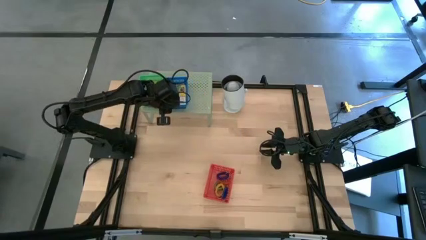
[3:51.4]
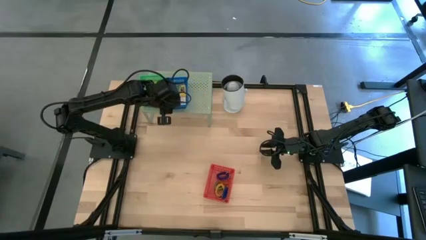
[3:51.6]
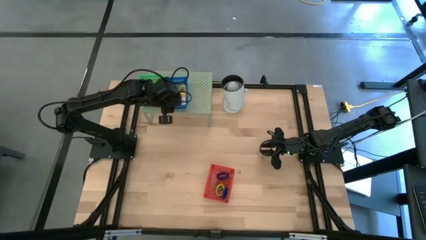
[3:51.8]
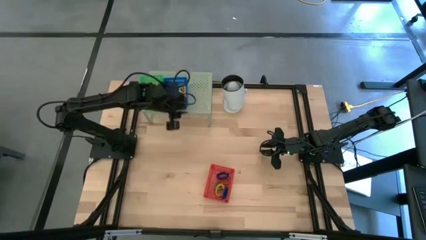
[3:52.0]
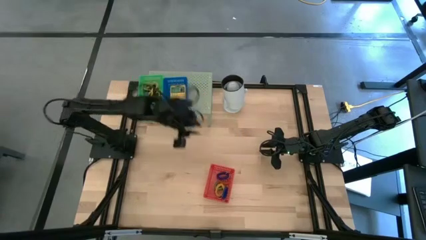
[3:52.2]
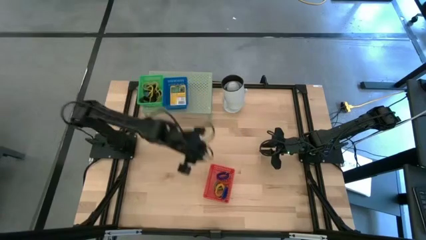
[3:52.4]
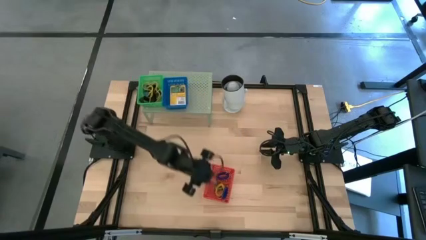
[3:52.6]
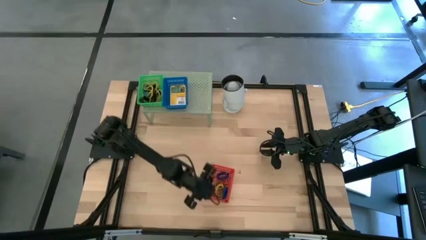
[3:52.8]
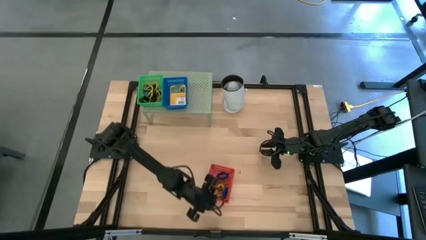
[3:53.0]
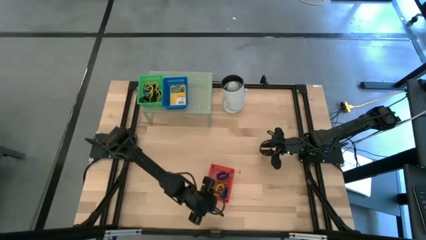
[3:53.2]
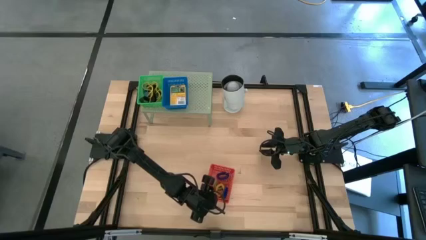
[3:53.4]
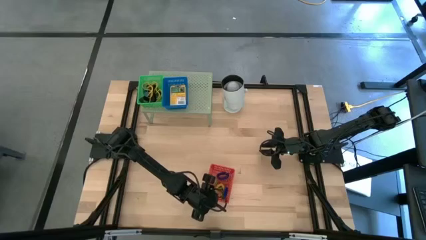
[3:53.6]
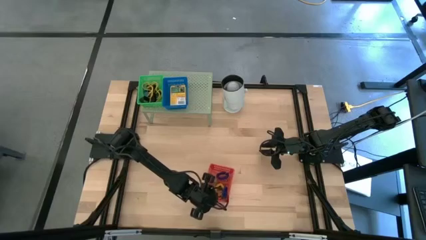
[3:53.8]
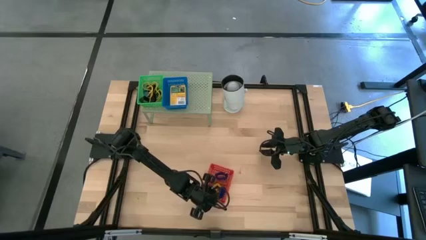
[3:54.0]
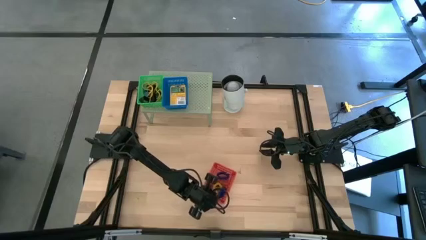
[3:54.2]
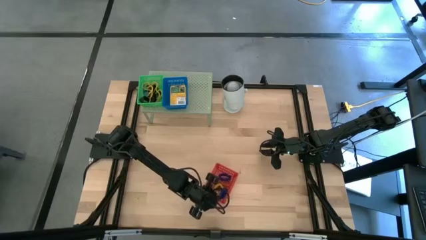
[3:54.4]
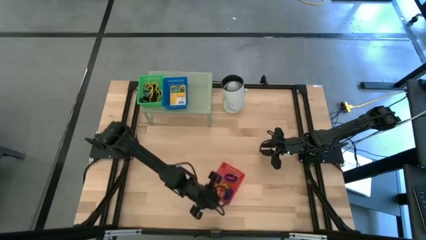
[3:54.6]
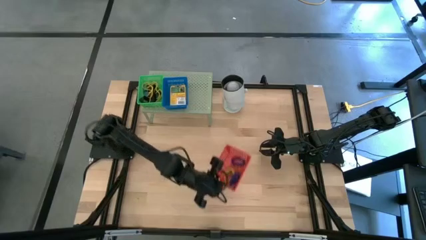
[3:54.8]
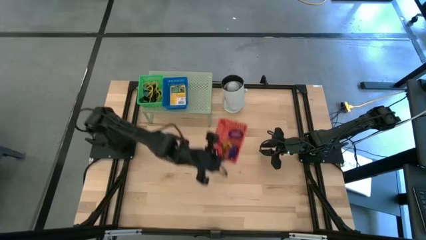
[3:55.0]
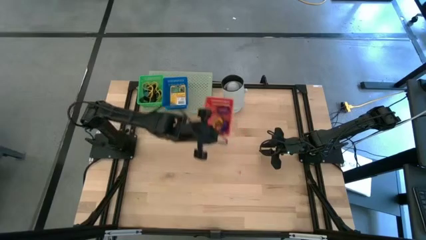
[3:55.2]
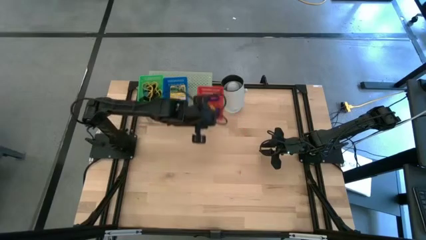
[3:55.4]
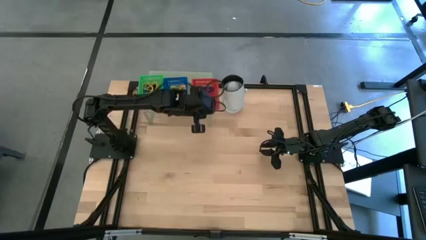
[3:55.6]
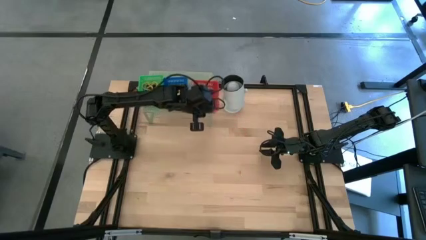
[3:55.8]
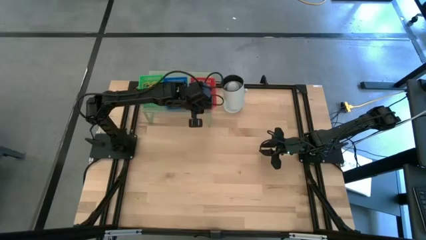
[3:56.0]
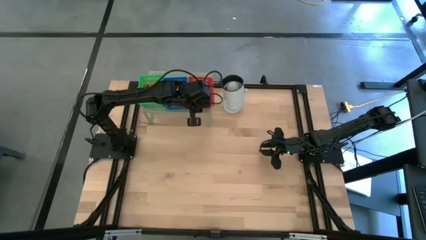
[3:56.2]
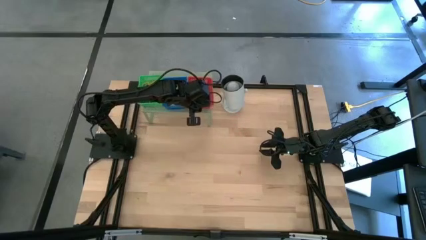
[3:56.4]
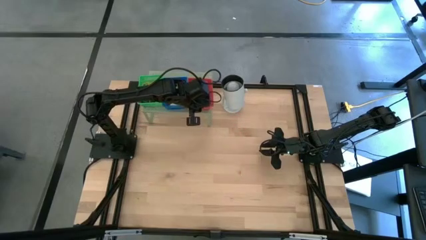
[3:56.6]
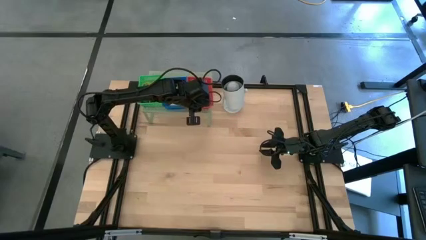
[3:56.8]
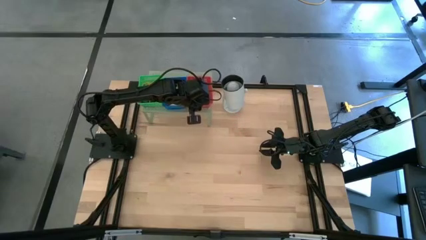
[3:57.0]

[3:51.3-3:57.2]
Task: Pick & Place Office Desk Supplies
Put the red bin on the shelf

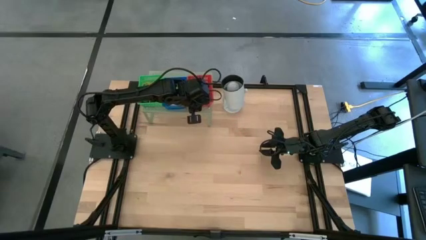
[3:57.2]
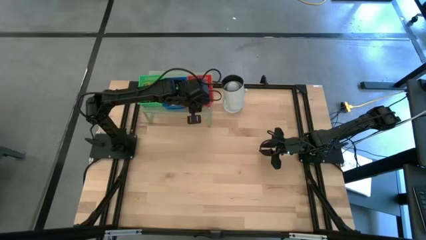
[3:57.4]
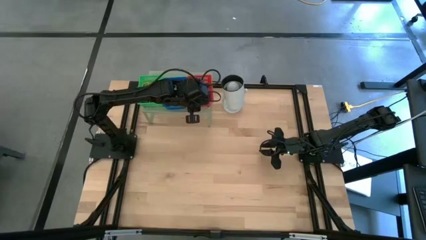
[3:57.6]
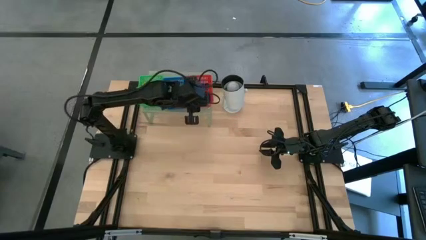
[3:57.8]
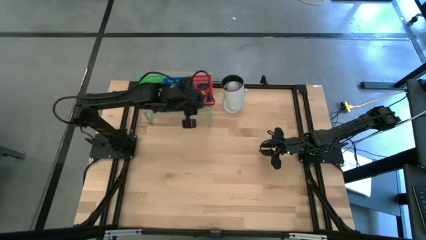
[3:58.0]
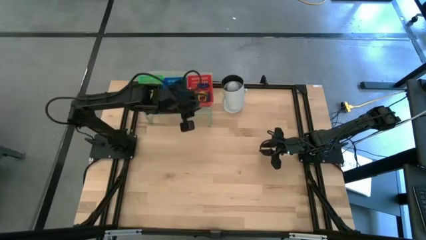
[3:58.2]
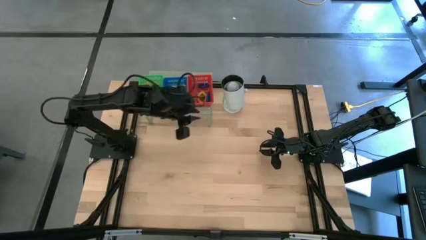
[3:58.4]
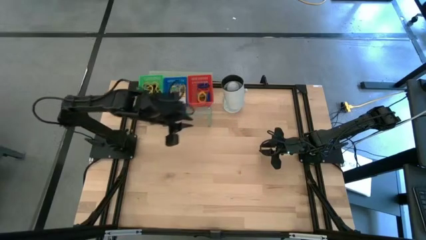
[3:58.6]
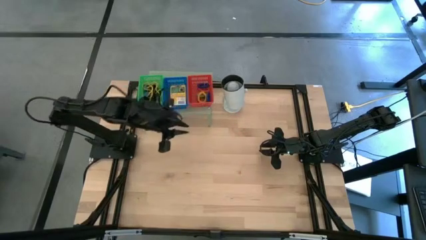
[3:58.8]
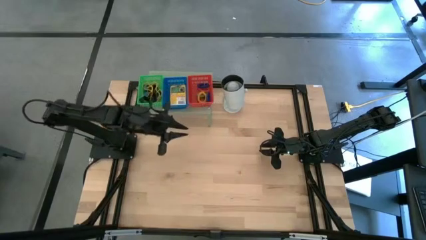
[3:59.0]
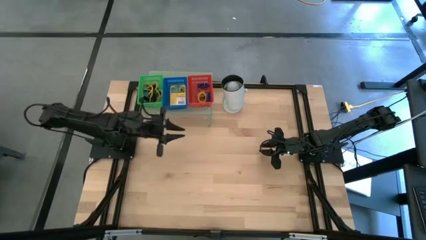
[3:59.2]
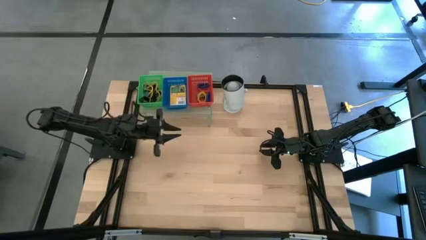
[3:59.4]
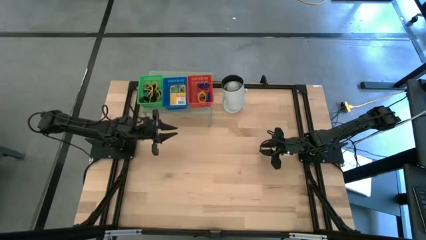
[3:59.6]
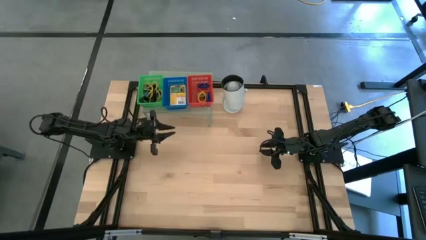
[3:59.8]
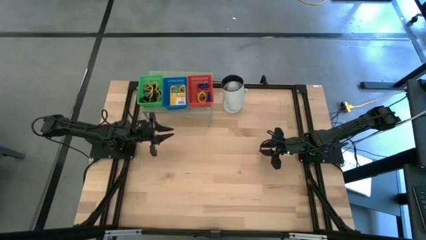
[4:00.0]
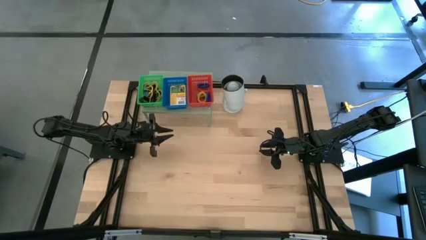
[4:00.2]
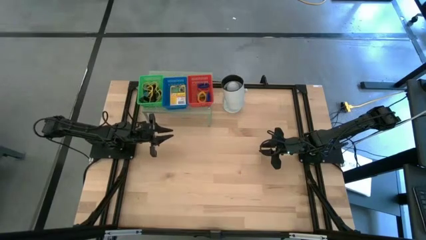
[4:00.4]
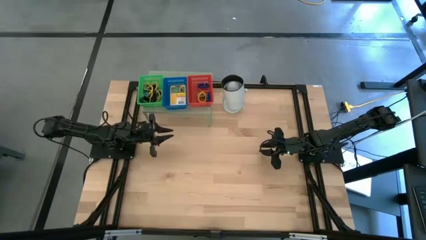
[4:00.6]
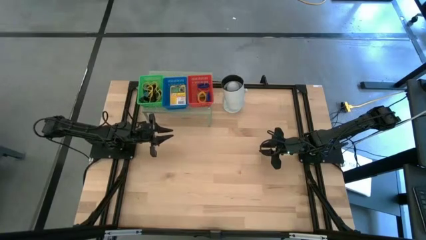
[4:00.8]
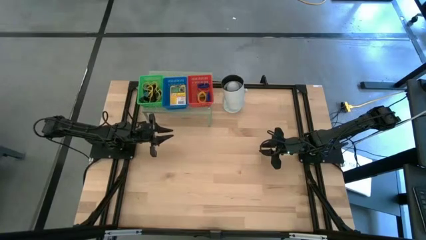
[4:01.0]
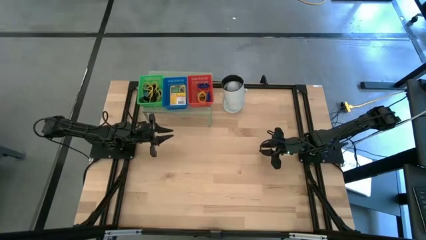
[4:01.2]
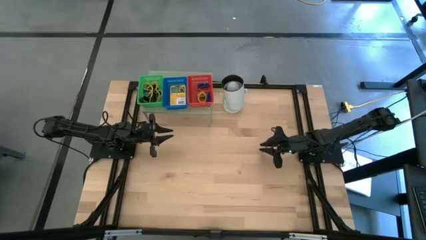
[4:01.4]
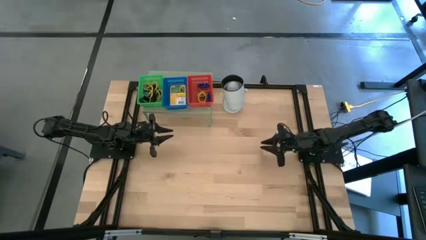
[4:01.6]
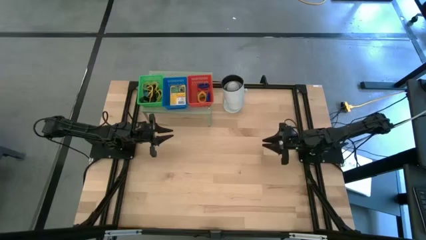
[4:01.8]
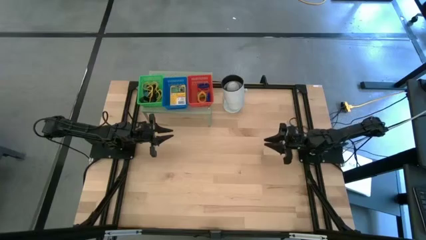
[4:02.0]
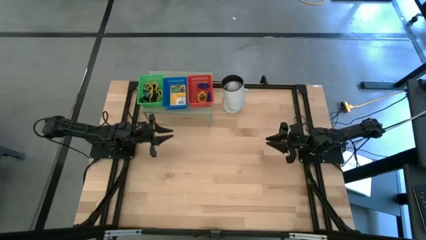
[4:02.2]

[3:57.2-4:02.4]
Return to Home Position

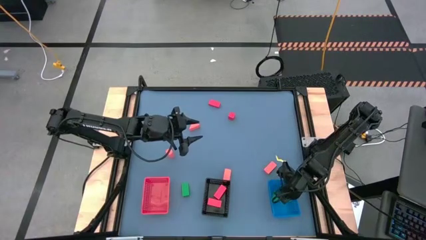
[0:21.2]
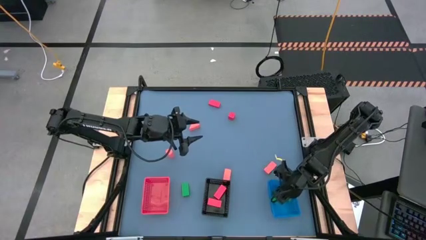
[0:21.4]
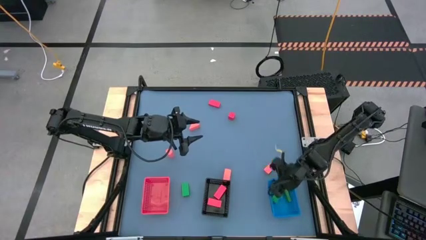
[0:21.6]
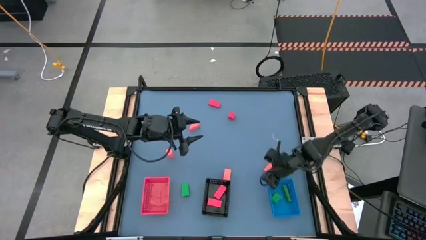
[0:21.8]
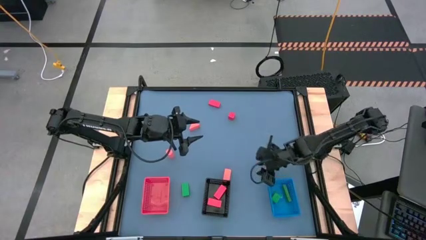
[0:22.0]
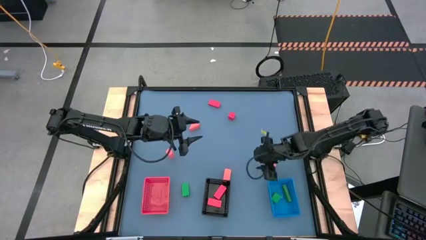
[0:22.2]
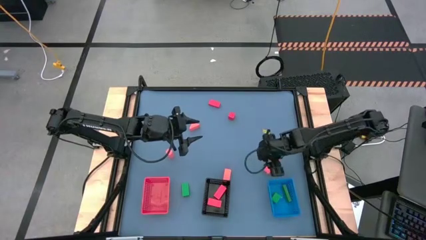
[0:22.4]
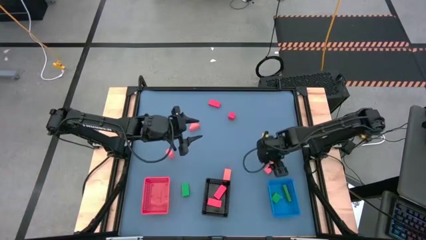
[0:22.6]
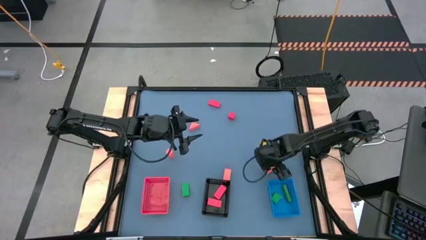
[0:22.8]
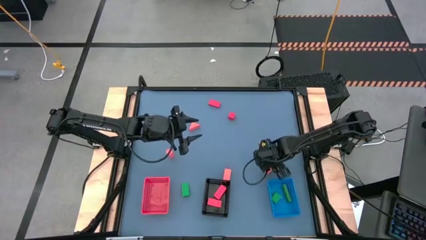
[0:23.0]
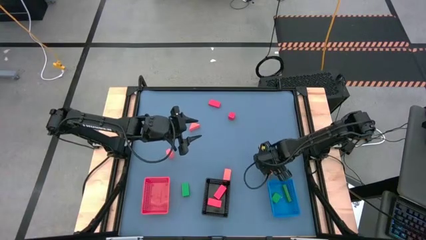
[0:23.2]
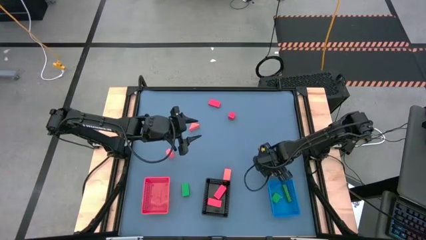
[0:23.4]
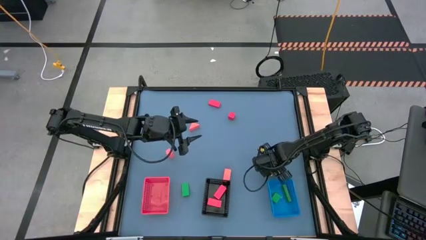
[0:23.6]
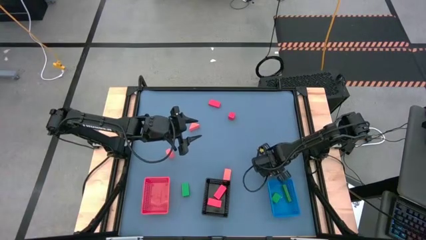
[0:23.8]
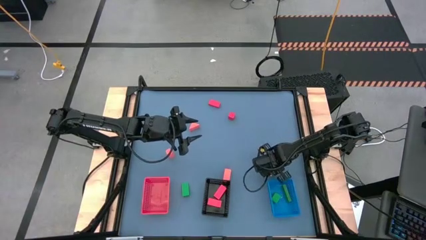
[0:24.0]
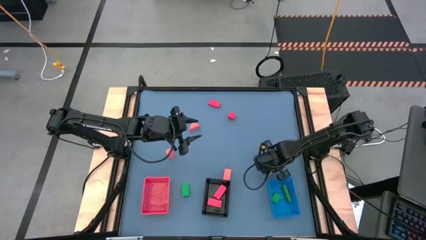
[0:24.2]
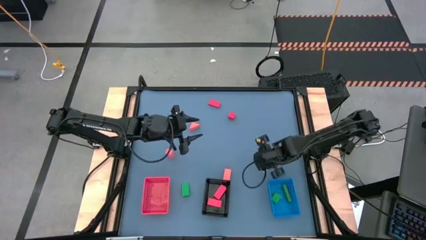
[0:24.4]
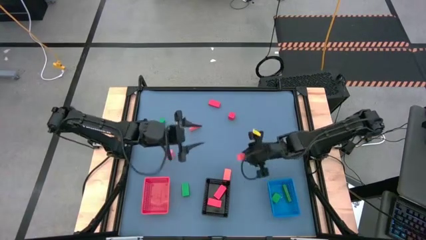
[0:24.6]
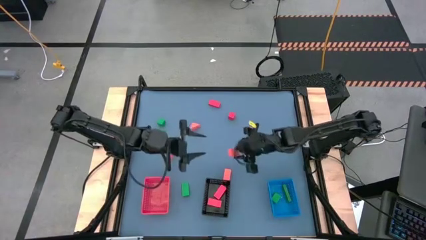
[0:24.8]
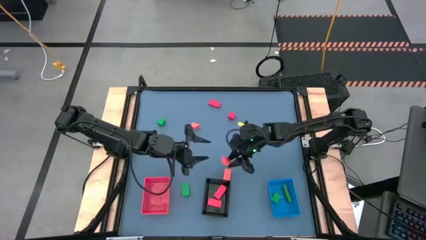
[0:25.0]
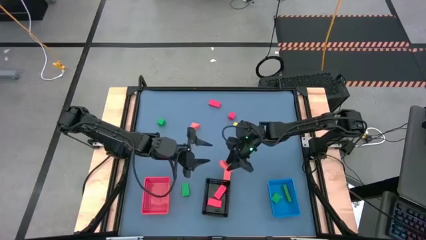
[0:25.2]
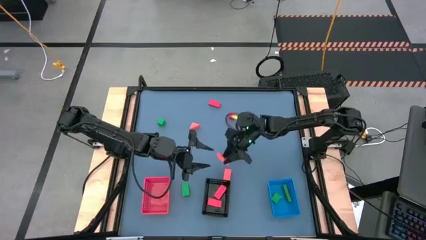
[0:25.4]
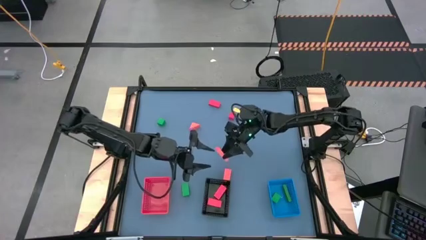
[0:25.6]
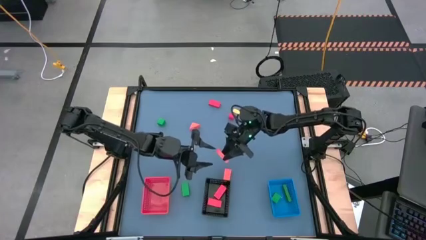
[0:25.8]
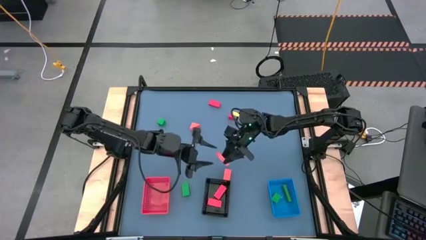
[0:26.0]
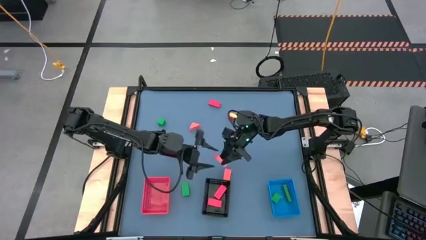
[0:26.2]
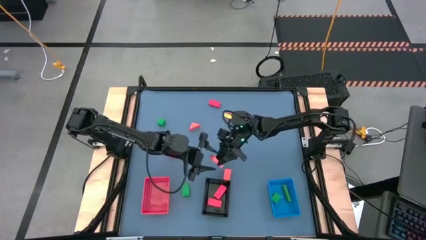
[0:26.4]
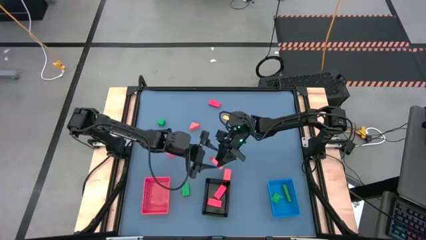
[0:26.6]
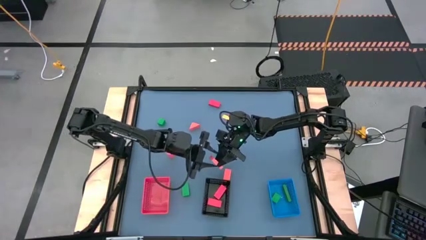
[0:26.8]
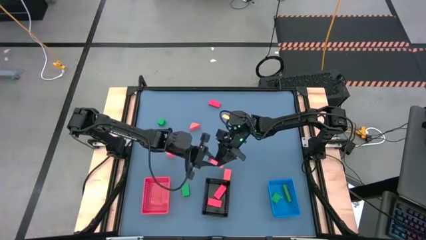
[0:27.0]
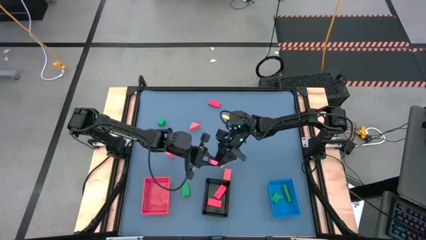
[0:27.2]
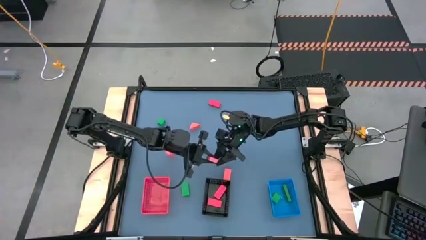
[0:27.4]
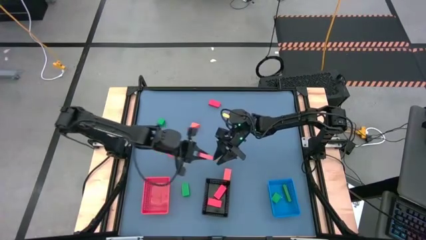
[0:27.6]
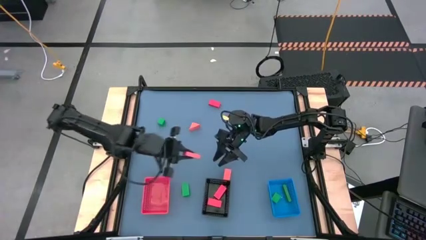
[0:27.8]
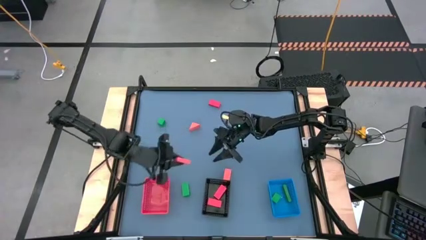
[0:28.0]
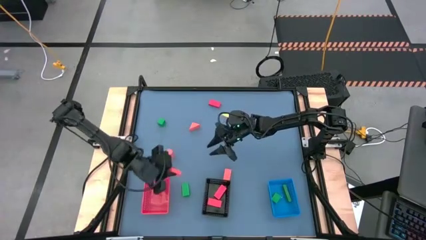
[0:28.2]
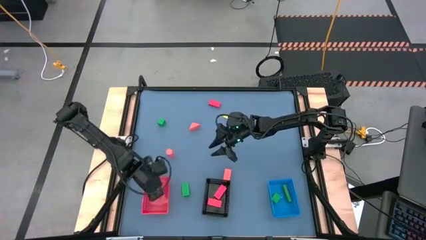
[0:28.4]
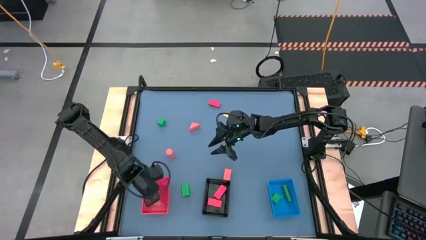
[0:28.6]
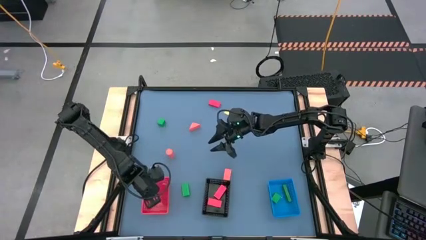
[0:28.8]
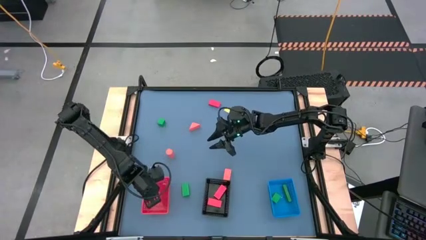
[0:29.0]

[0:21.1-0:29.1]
Task: Sort & place blocks by color
Put the orange block into the red bin
